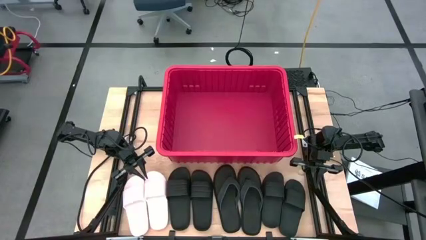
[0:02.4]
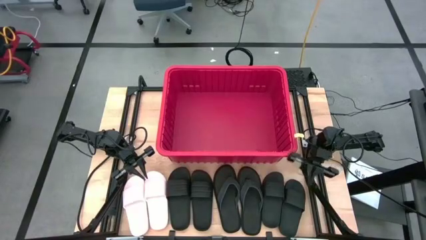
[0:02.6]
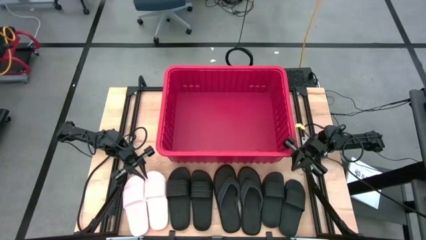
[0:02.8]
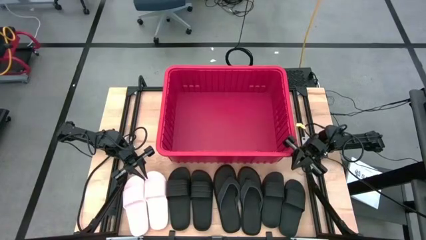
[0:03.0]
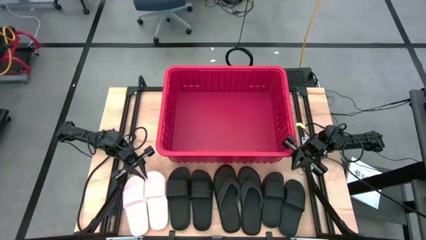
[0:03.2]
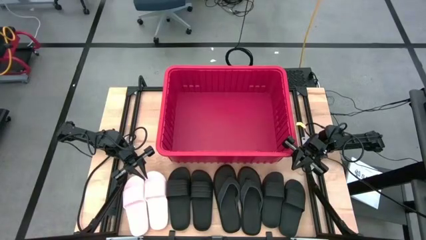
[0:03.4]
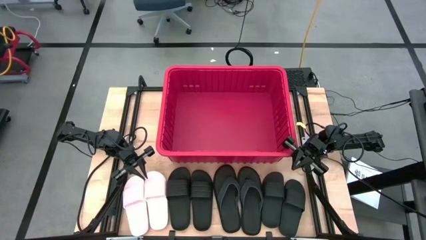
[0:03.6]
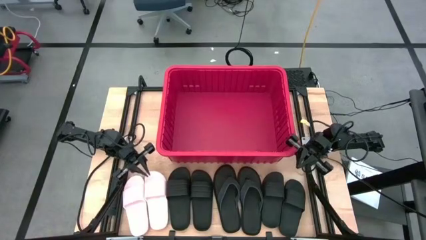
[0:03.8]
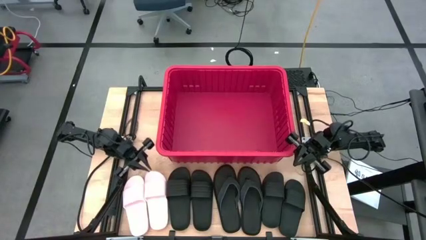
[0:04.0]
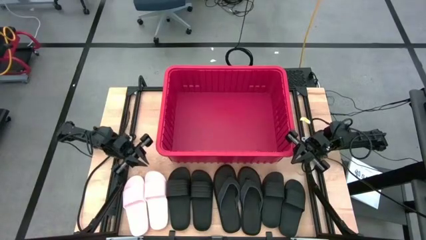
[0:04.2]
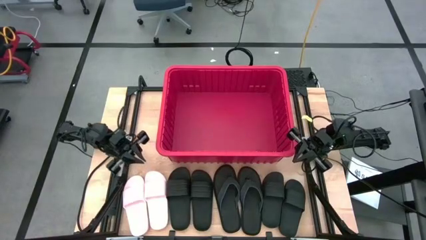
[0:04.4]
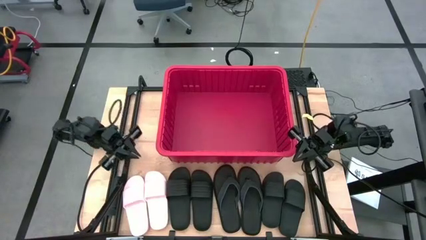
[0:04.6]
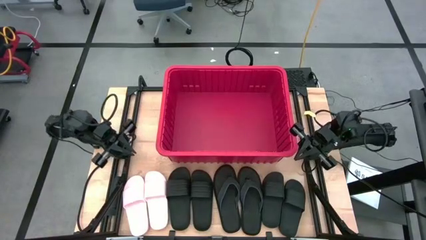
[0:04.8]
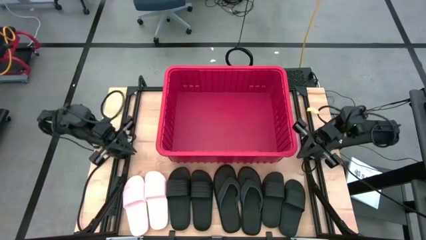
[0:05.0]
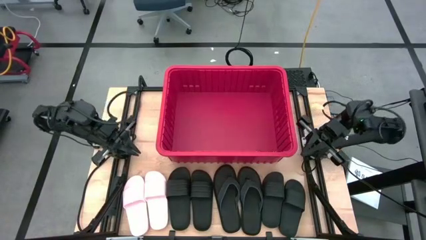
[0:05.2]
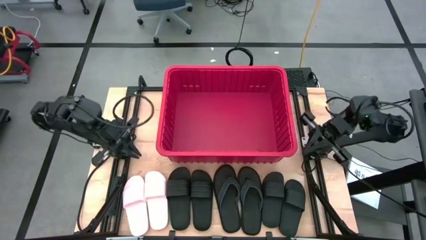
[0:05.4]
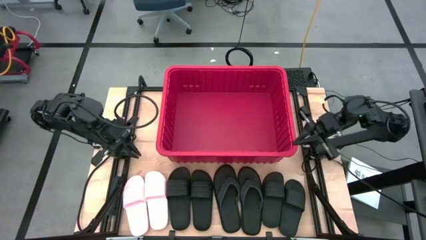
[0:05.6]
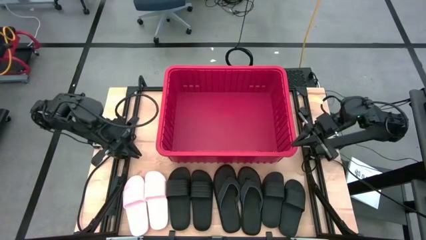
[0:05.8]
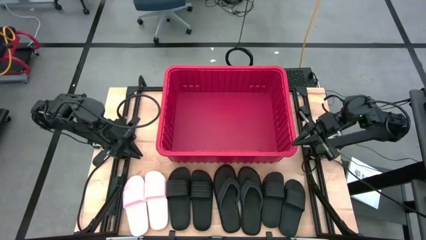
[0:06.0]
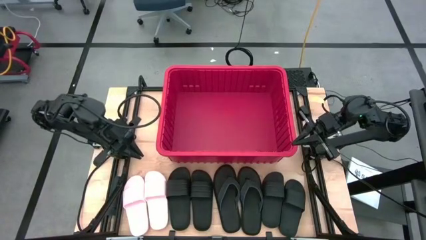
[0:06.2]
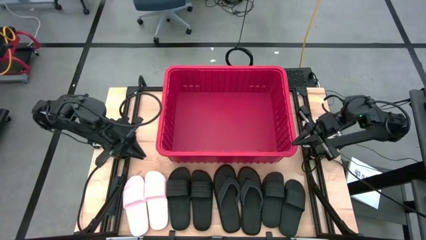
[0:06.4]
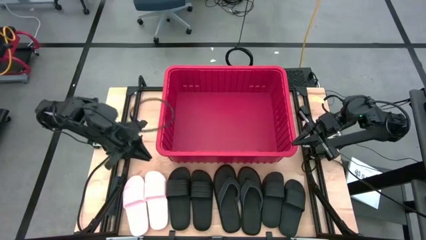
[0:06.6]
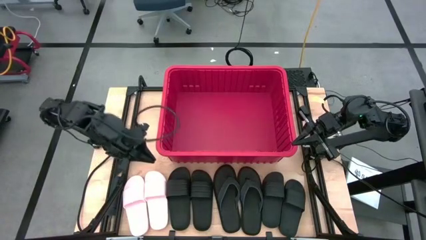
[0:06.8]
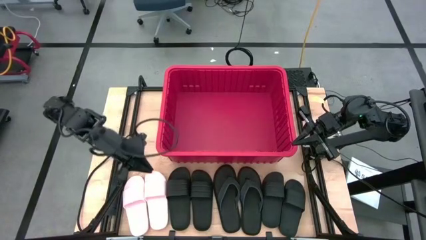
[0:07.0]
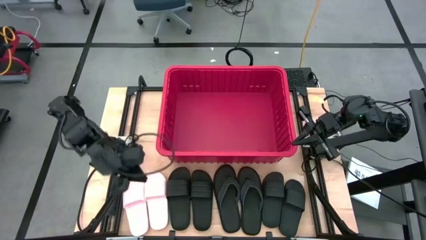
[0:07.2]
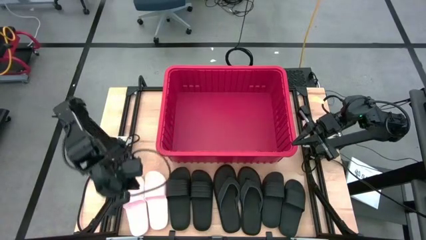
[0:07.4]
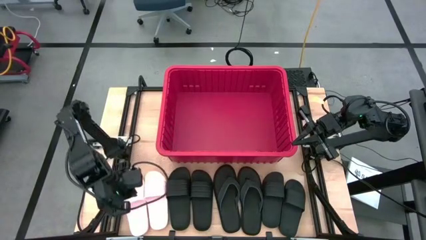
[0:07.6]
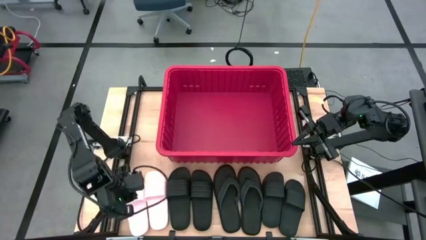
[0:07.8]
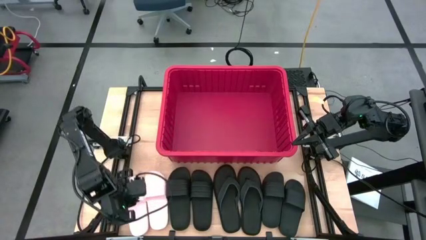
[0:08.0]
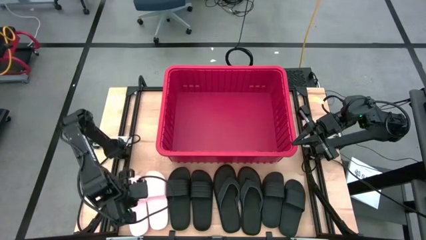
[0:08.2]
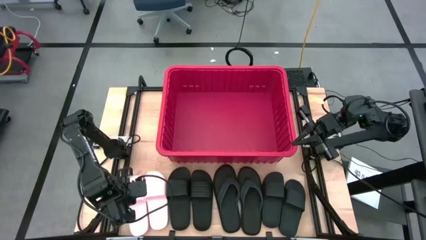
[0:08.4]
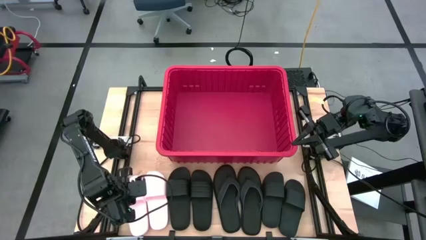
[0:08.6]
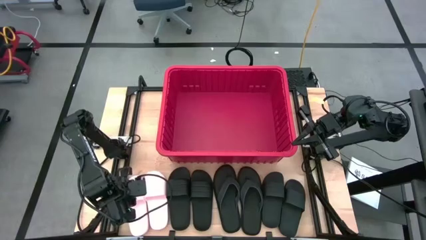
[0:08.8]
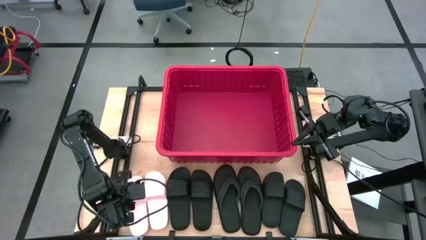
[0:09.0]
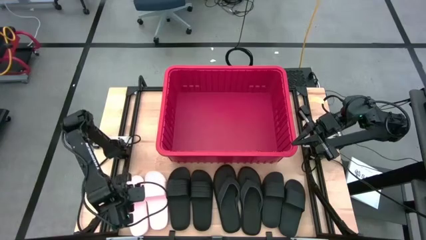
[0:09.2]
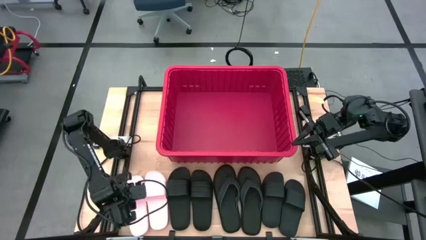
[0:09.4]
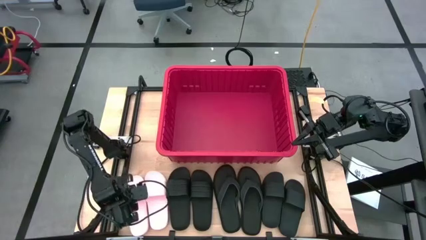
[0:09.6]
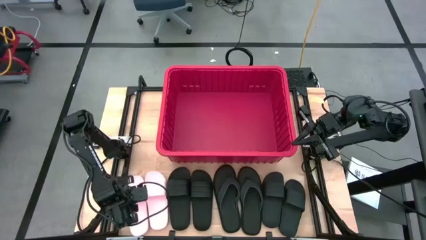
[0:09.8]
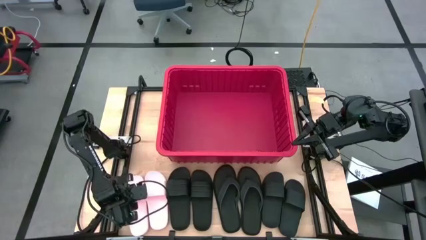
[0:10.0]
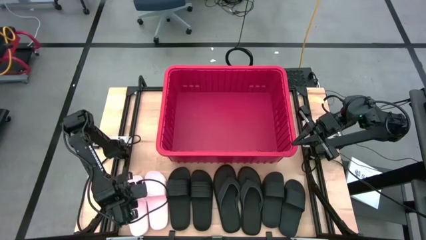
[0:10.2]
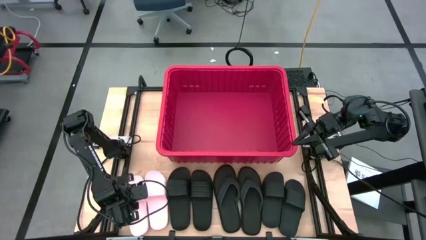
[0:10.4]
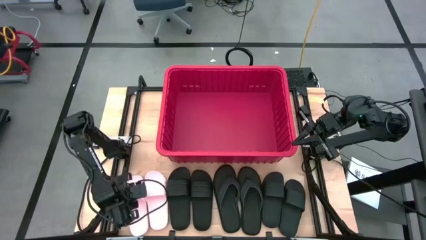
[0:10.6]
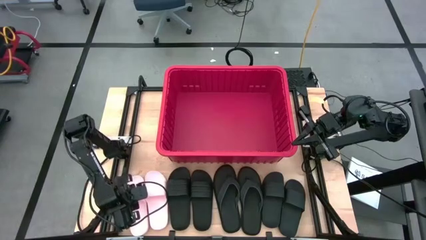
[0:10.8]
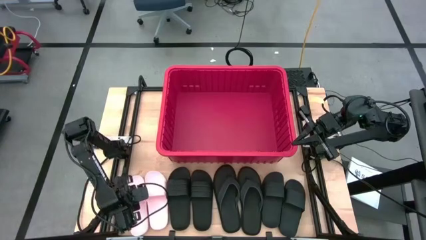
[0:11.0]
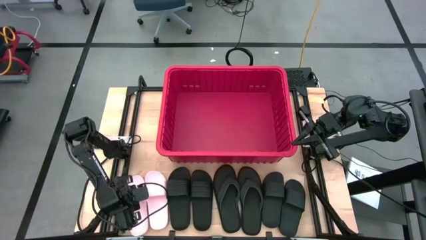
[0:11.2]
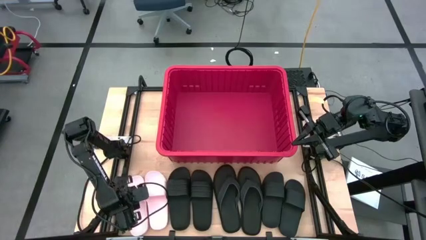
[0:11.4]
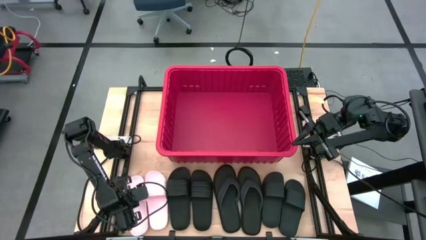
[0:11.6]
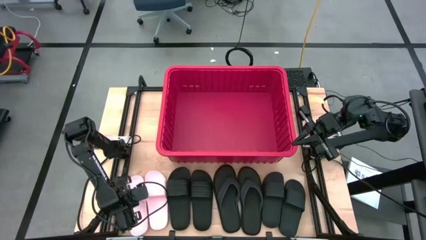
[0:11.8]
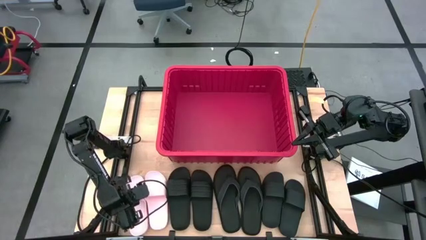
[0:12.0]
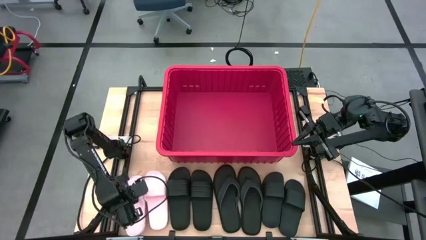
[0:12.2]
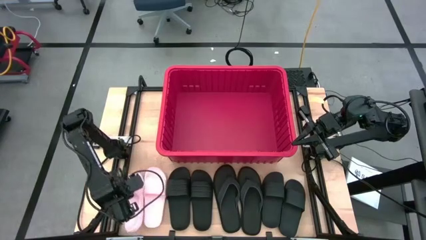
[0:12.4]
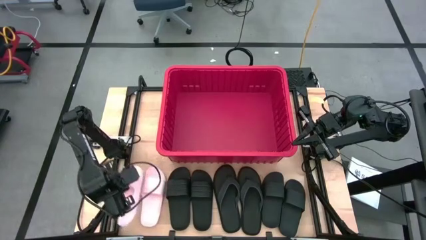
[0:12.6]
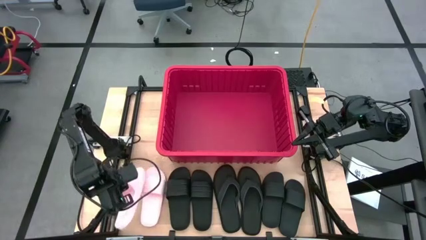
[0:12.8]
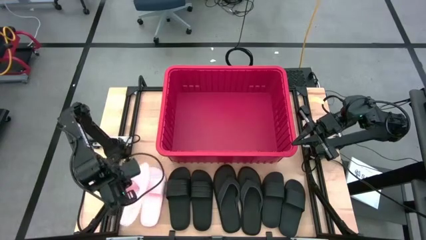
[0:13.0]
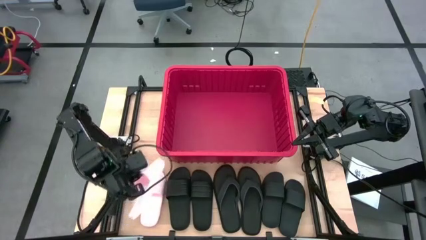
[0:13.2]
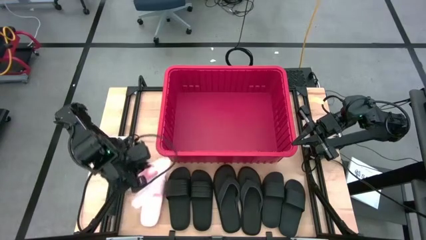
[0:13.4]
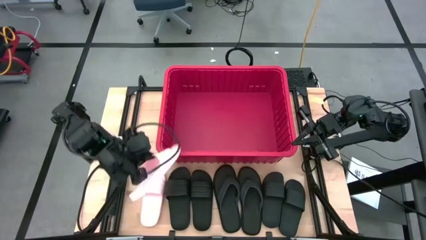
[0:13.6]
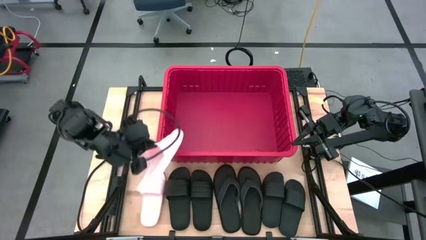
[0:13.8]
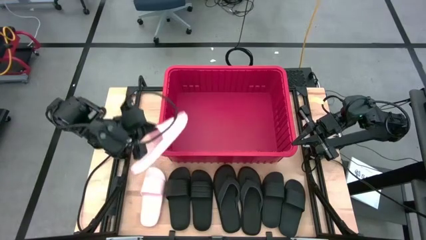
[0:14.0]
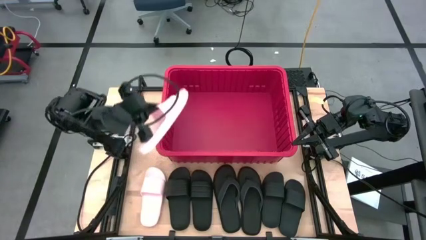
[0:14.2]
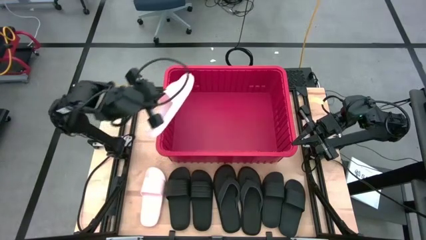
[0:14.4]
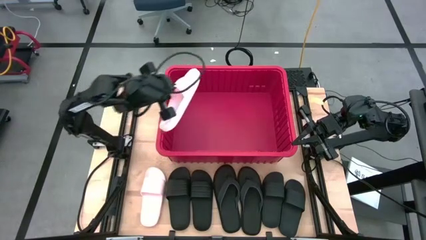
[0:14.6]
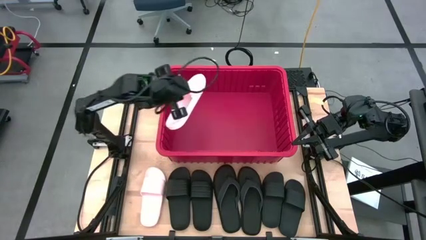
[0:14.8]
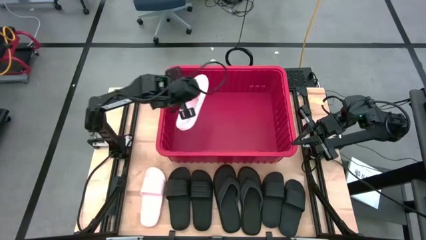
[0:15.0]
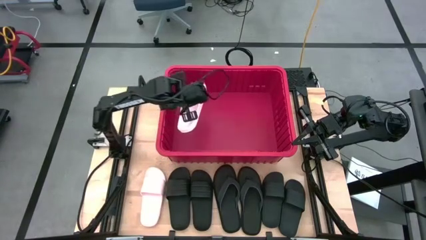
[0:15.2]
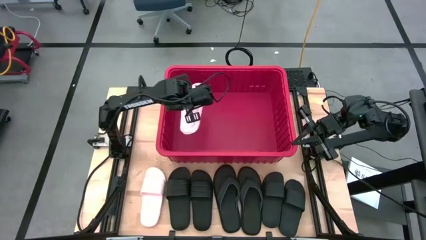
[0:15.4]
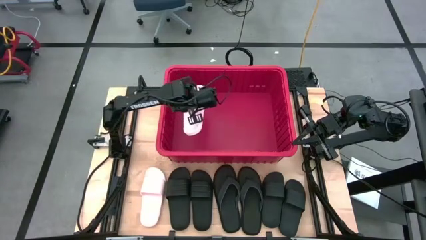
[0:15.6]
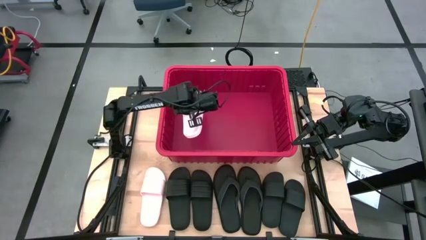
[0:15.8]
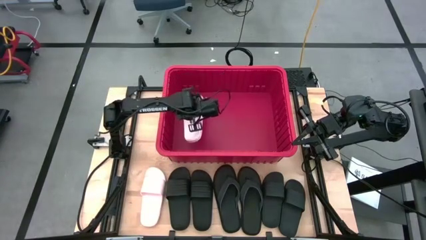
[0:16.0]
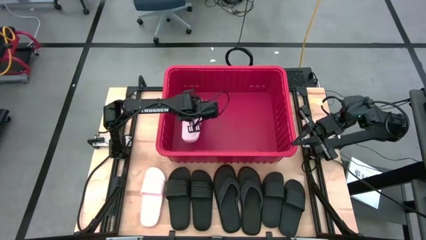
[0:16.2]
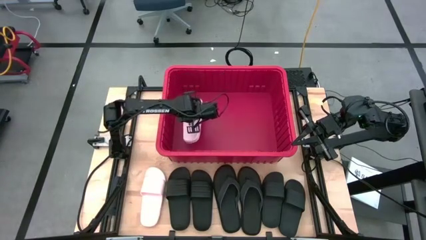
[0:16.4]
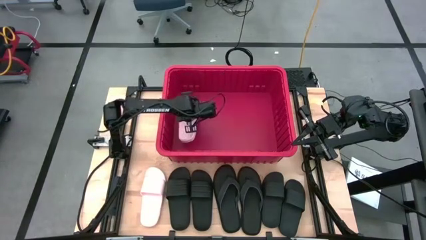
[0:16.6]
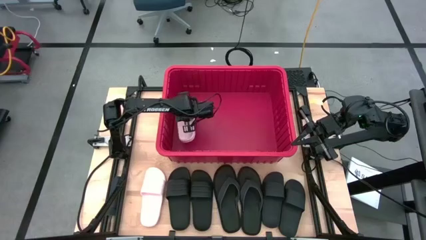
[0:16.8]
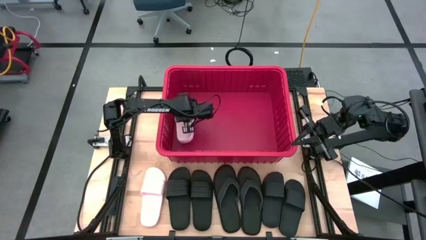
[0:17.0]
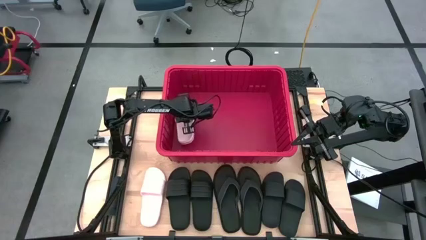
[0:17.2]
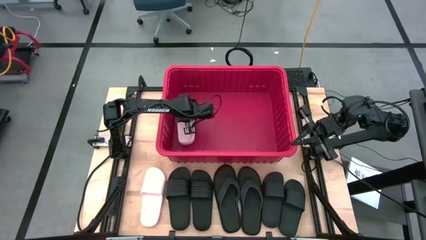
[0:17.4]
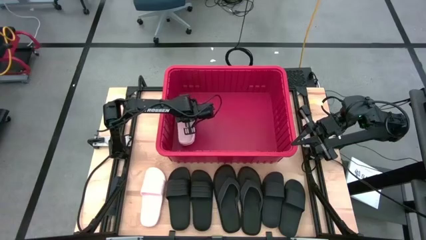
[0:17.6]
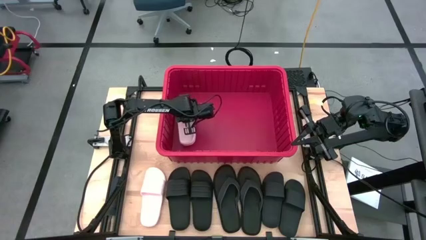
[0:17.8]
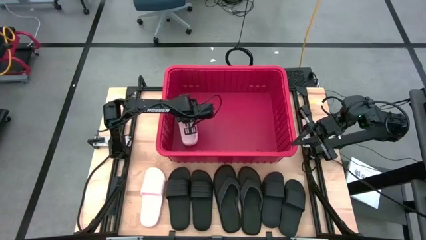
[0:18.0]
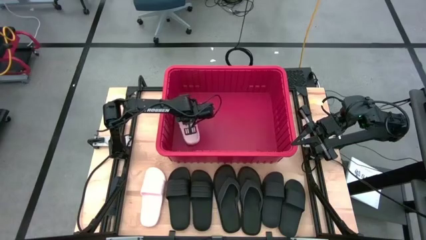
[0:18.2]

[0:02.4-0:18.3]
Task: Pick and place slides into bin
Put the left pink slide into the bin
